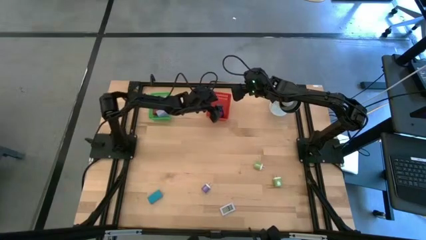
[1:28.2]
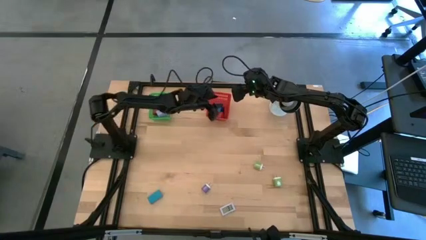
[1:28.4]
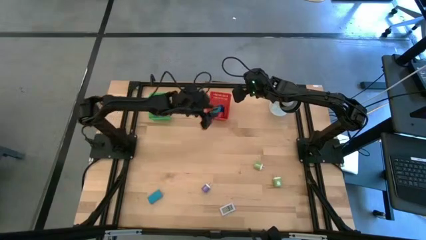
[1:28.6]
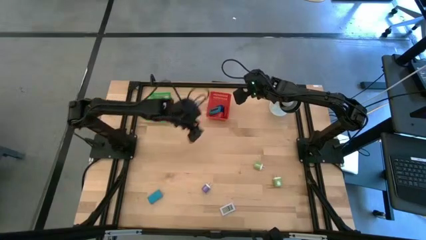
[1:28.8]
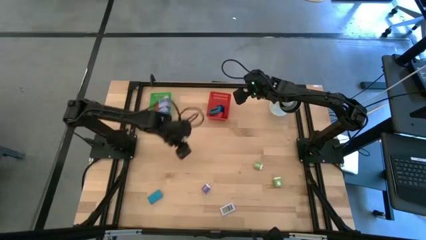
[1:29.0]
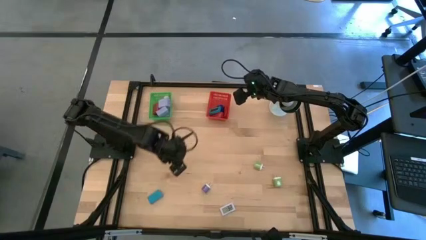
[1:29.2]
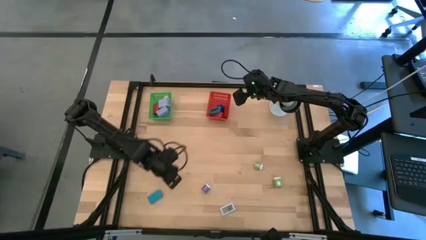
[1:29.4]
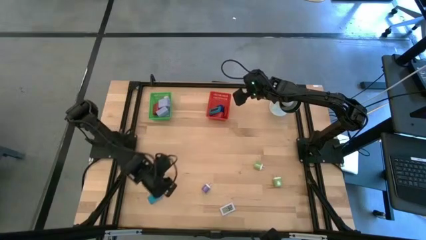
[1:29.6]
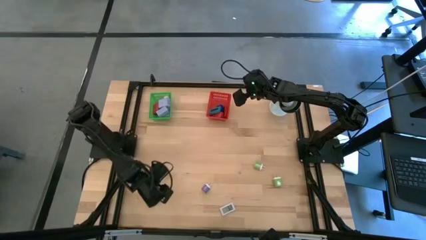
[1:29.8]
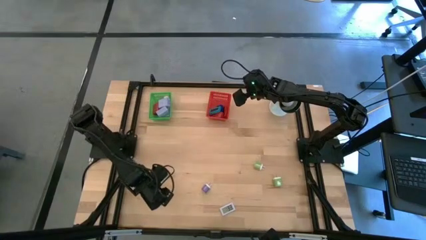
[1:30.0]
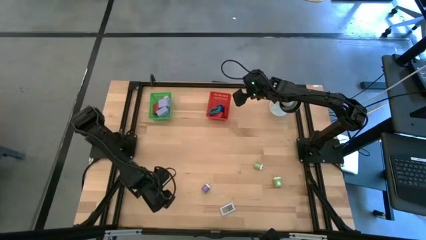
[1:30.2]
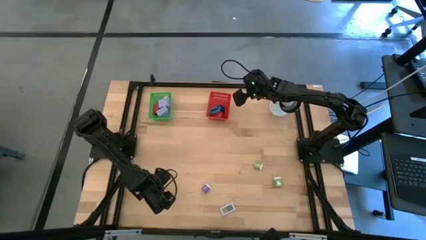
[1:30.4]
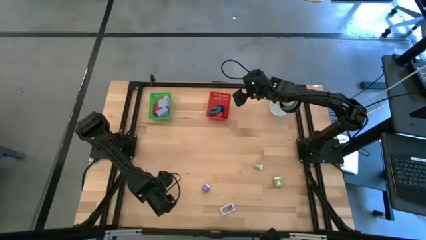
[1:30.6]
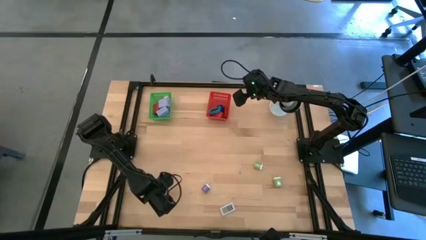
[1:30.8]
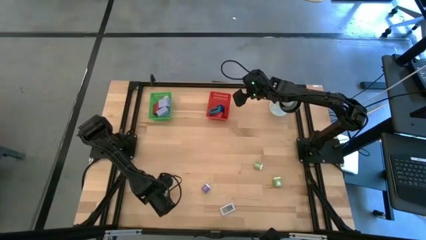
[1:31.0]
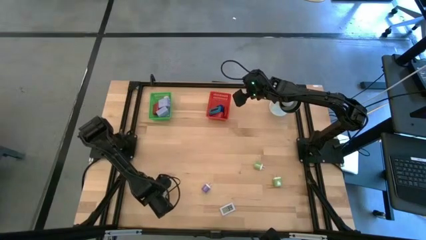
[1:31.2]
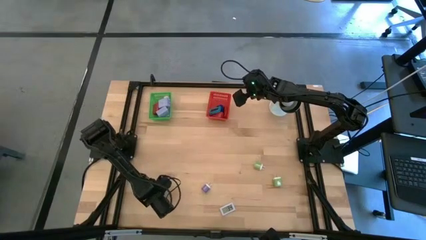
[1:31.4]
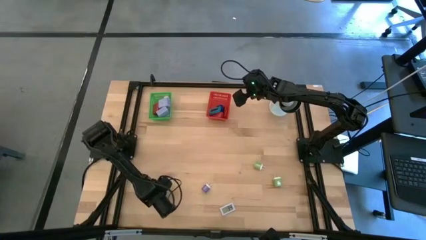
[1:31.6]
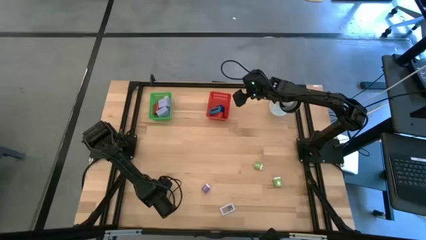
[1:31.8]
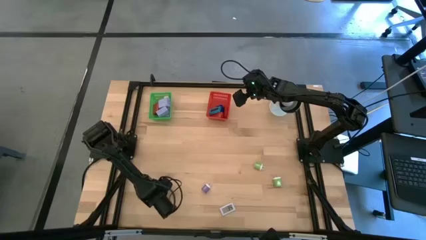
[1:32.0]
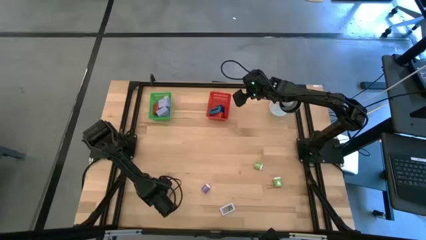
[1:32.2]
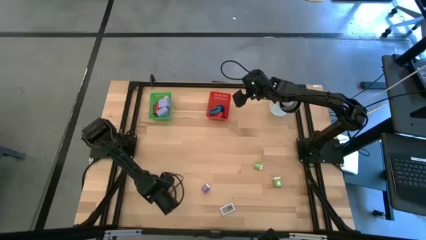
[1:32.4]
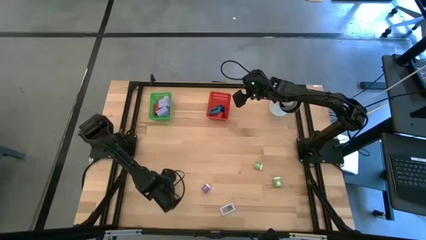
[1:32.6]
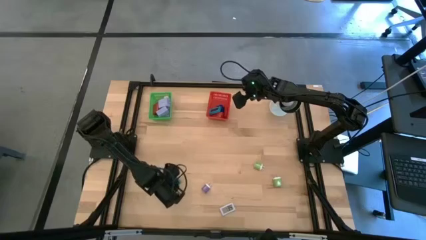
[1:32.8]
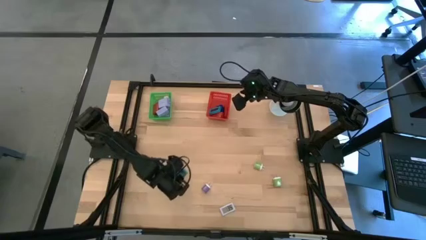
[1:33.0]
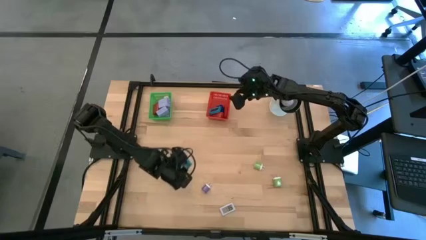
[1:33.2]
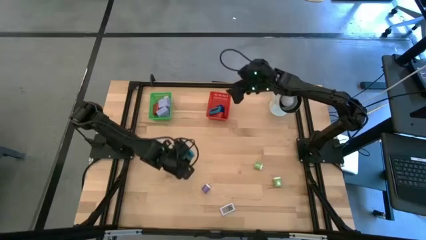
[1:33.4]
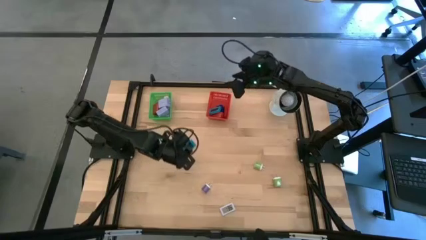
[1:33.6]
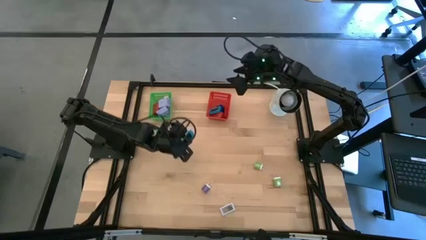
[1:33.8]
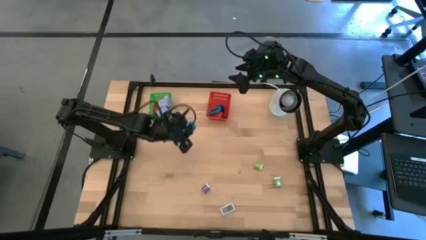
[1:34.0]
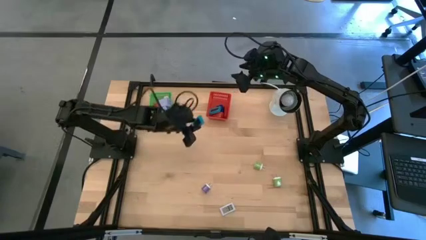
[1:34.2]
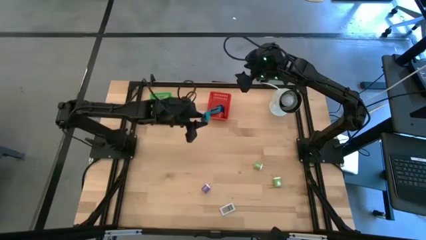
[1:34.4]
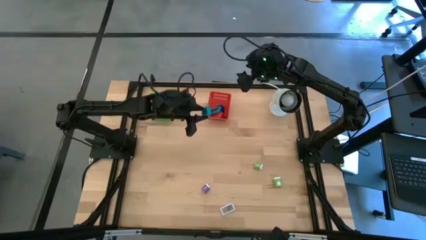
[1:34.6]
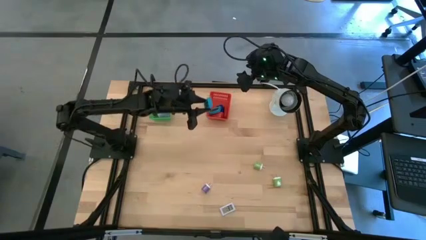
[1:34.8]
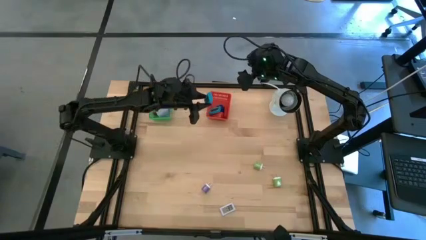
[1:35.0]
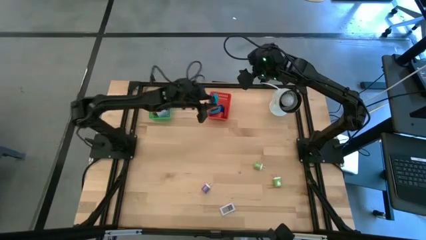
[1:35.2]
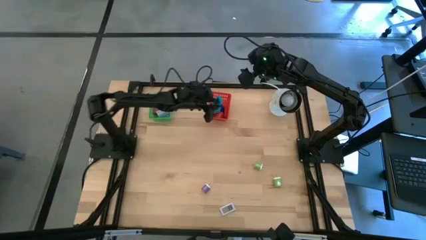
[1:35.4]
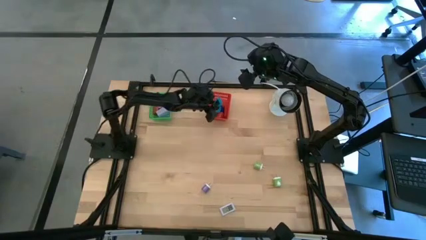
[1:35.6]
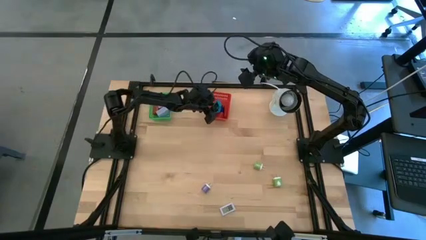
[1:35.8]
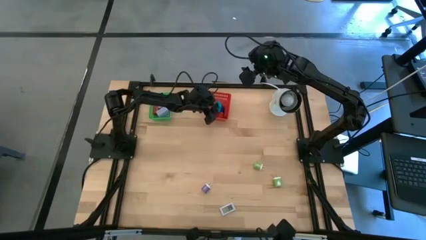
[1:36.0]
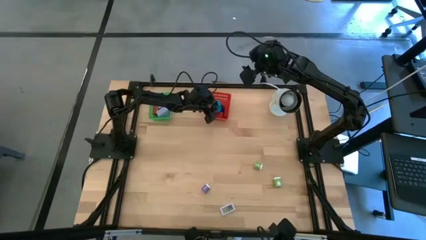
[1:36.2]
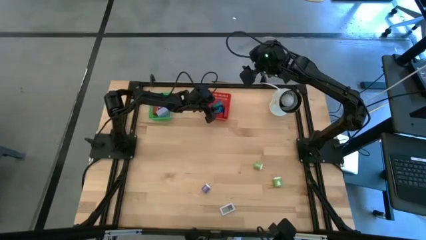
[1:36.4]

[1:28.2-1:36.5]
Task: Pick & Place Office items
Put the light blue digital timer into the red bin

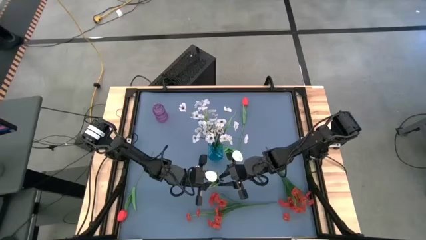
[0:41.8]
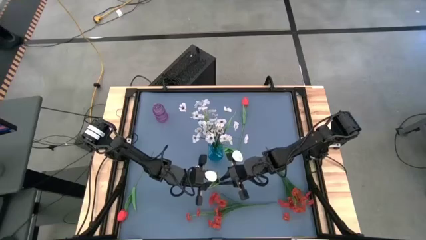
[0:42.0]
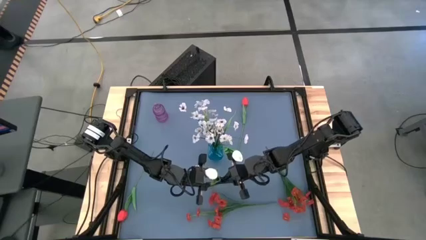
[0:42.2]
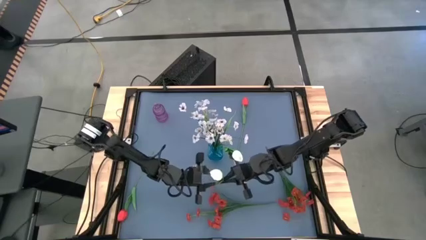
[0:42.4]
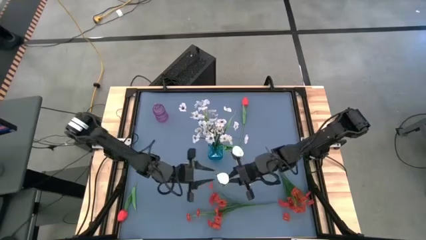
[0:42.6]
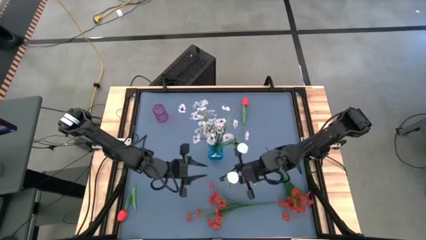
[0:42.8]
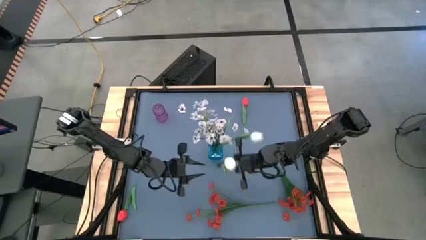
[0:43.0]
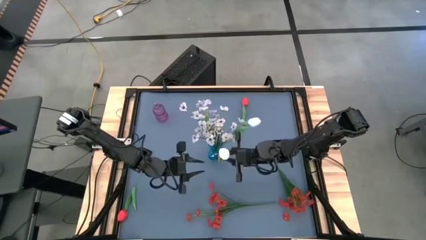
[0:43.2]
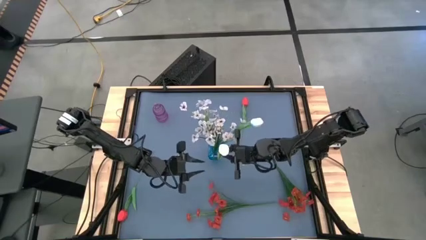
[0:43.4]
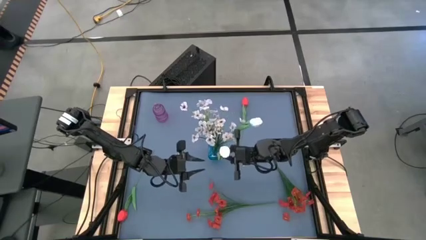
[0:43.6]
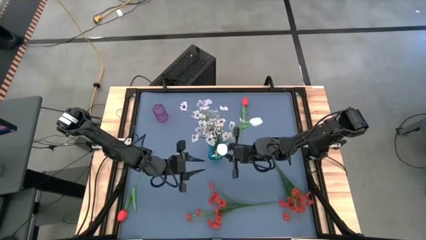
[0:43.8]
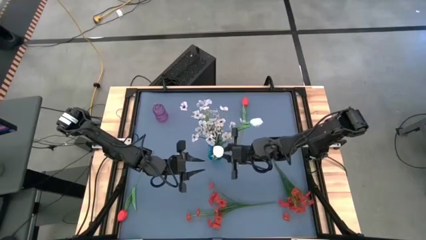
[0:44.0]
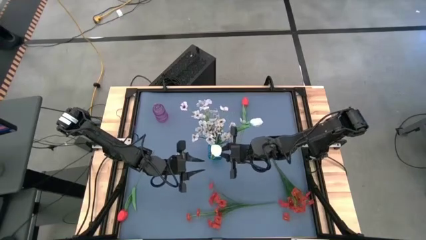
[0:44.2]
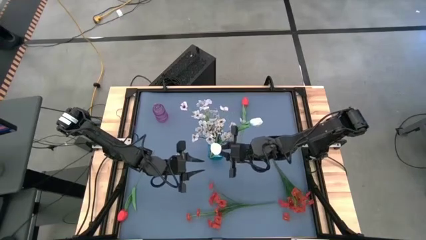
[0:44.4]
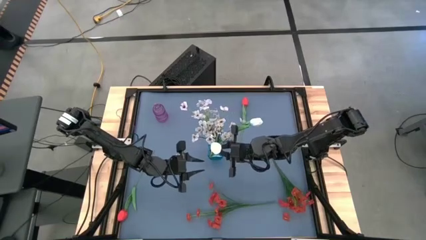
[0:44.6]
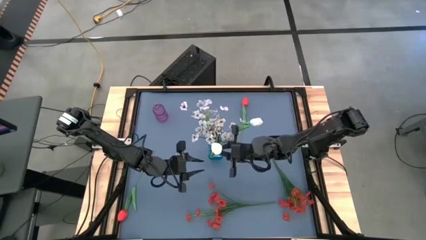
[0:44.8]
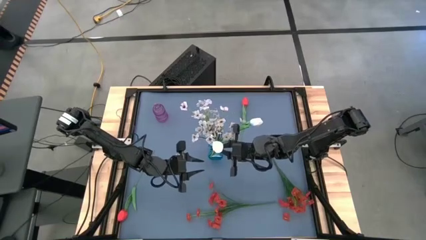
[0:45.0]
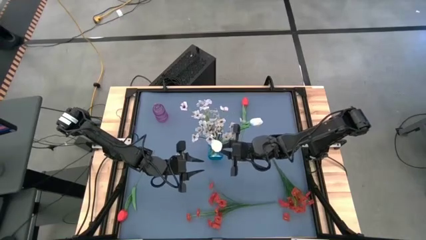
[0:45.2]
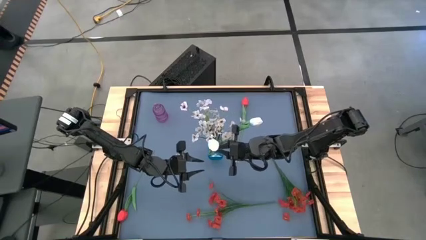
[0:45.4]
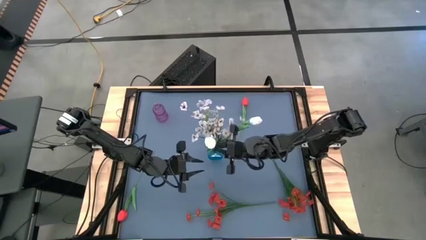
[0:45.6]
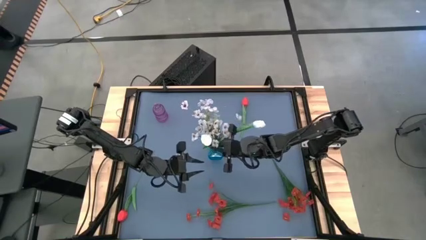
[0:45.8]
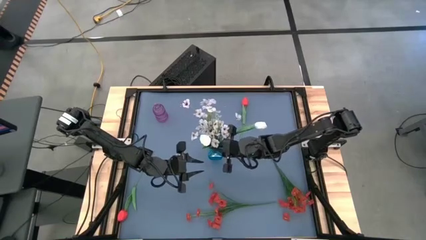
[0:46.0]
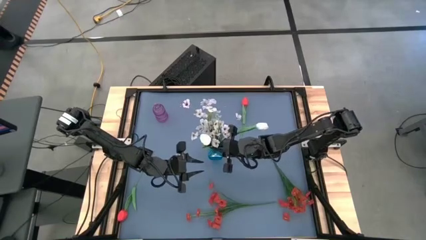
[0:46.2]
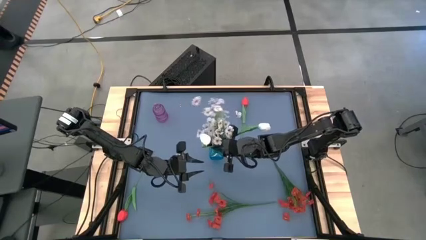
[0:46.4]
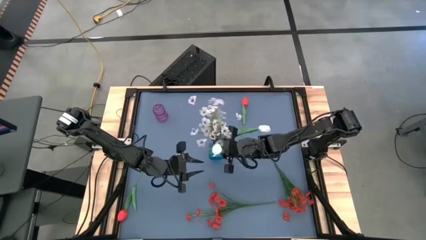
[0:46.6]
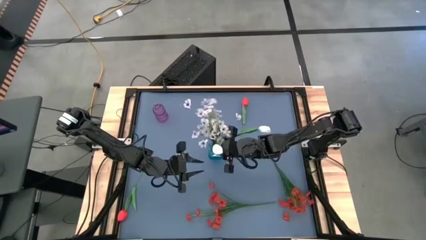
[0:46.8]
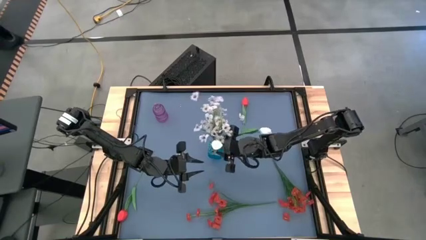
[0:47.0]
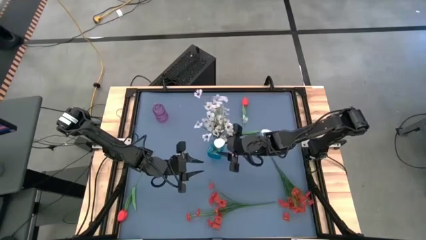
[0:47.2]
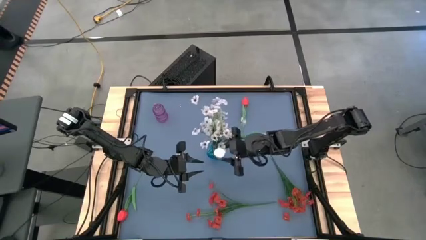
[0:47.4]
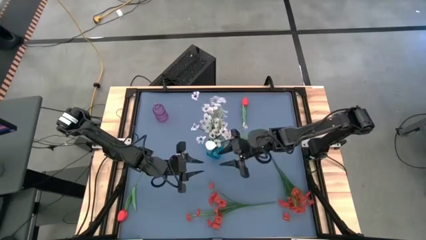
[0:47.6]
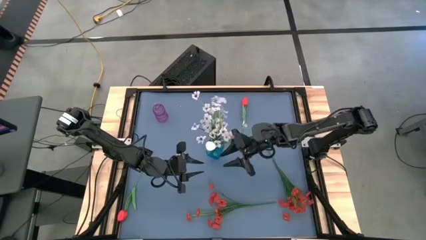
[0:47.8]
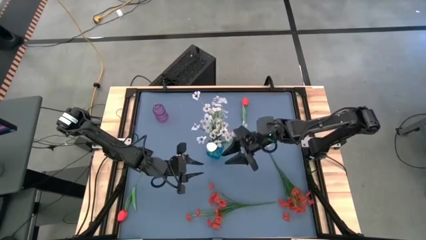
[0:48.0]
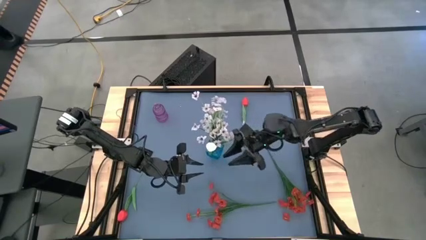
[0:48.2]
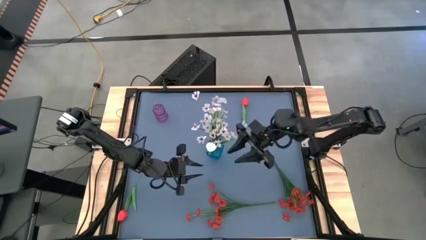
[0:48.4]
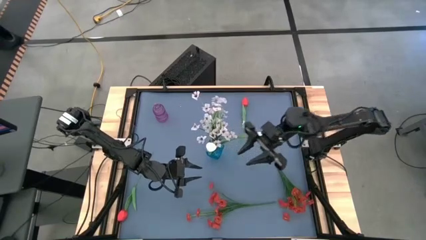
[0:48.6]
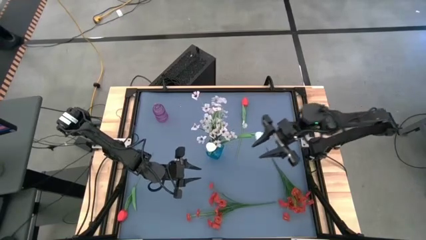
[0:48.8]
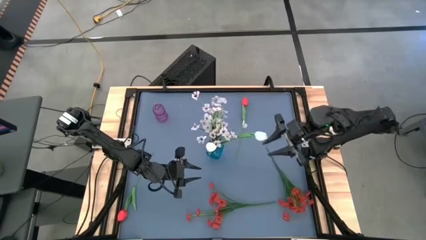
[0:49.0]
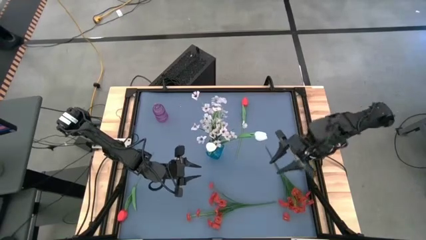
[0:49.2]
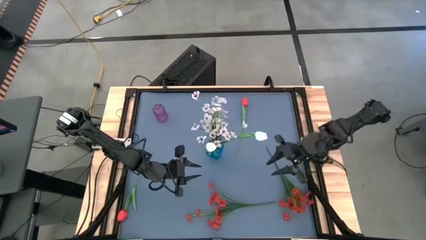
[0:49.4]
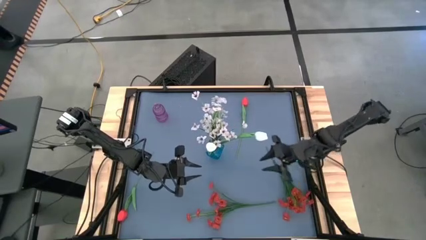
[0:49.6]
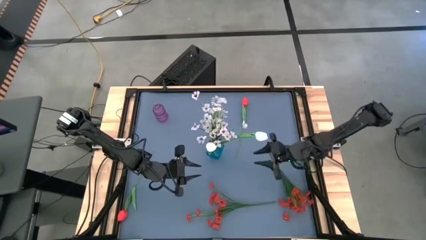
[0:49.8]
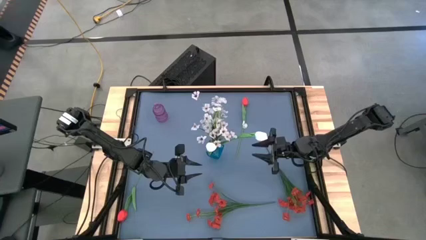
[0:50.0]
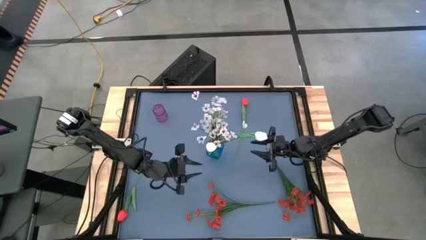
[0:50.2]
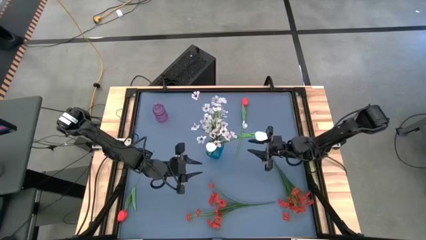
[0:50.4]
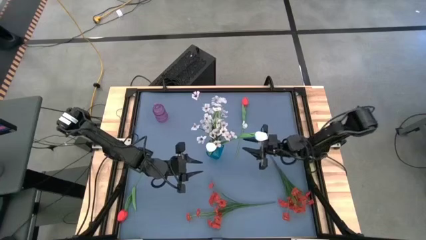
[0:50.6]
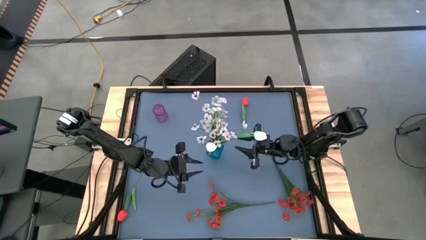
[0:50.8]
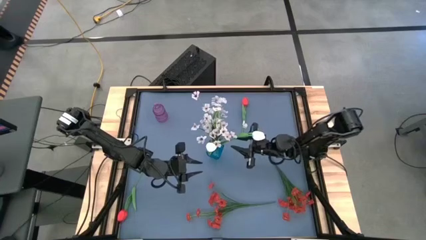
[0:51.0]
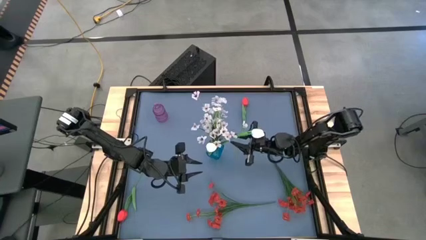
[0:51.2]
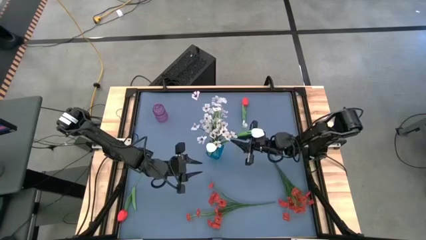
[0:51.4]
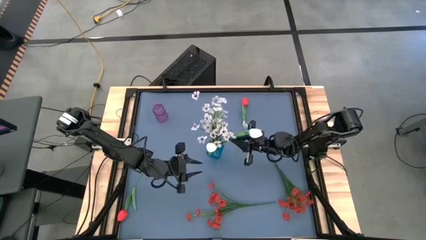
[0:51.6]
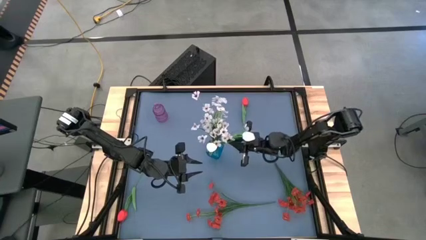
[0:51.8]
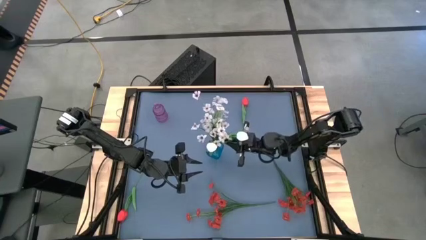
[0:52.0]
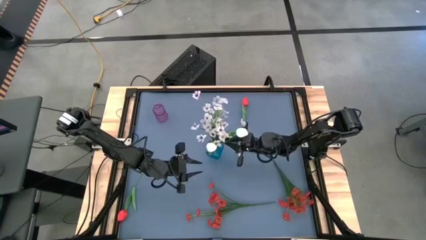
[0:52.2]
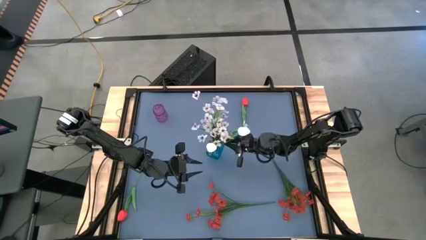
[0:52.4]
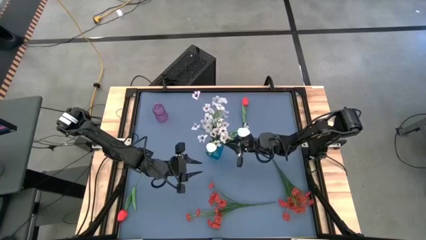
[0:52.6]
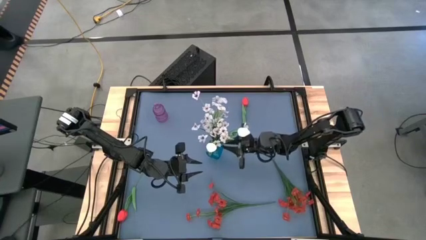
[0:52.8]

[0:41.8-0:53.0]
Task: Sort flowers into vase by color
Put the white flower into the blue vase
